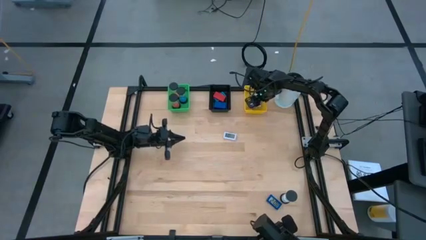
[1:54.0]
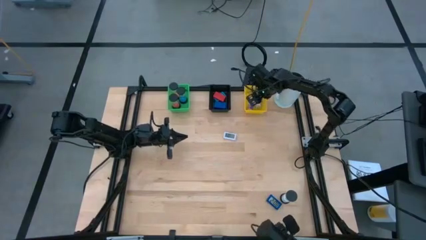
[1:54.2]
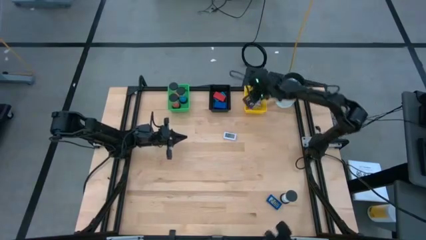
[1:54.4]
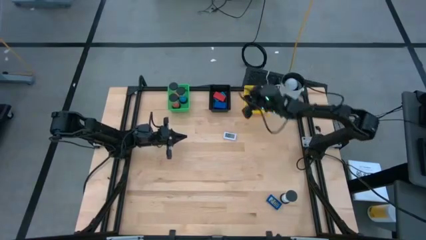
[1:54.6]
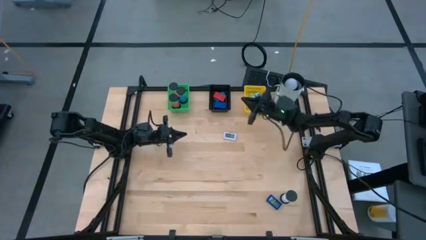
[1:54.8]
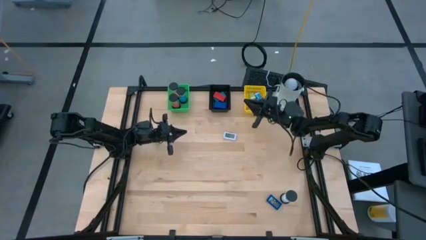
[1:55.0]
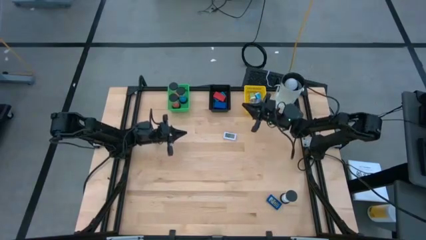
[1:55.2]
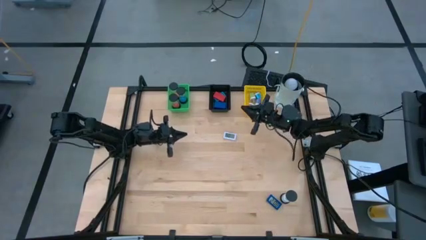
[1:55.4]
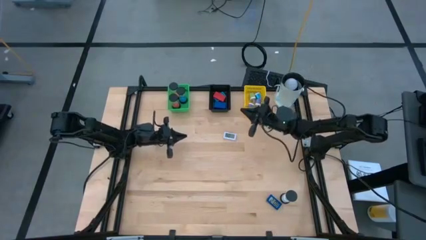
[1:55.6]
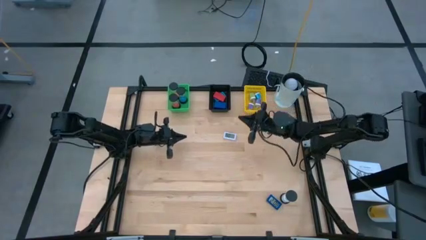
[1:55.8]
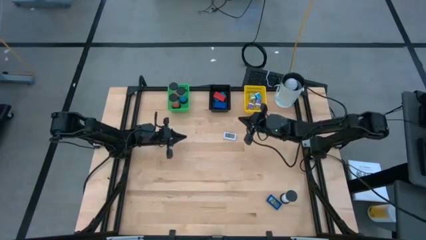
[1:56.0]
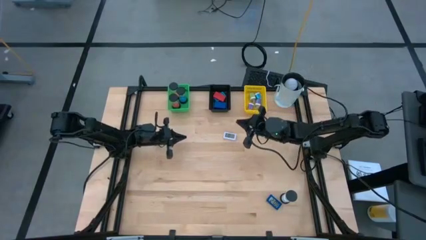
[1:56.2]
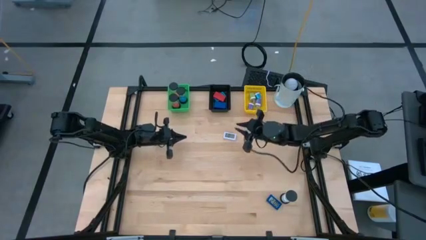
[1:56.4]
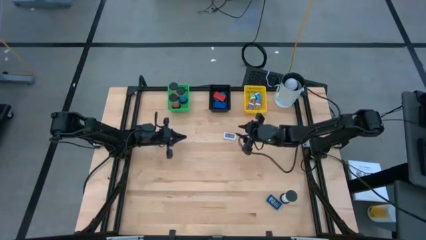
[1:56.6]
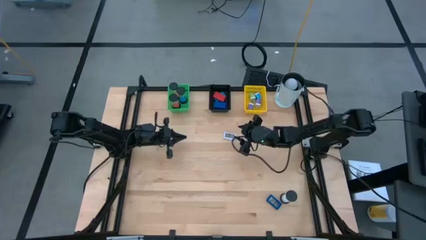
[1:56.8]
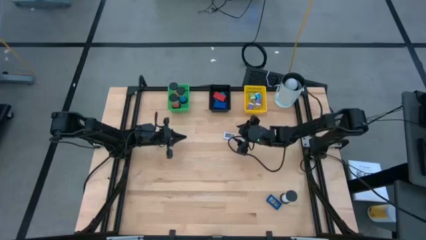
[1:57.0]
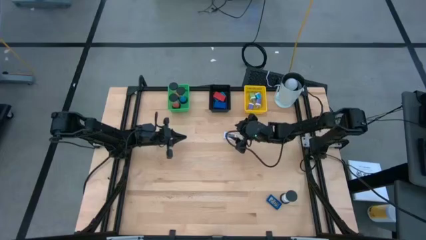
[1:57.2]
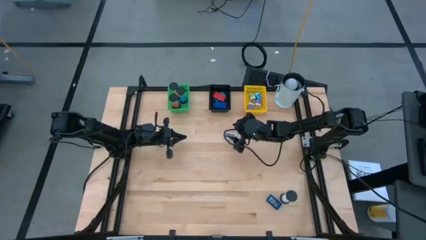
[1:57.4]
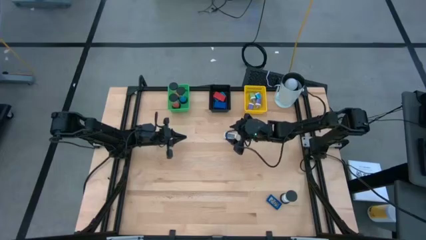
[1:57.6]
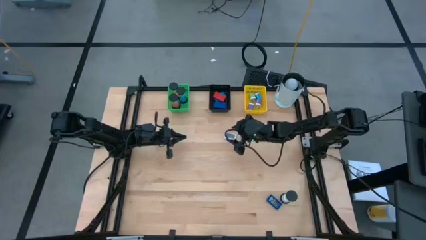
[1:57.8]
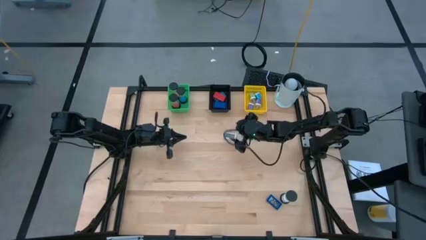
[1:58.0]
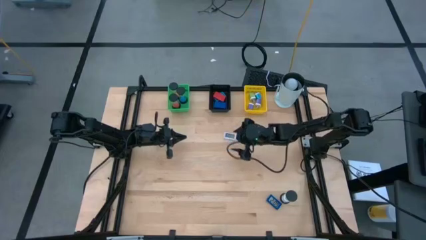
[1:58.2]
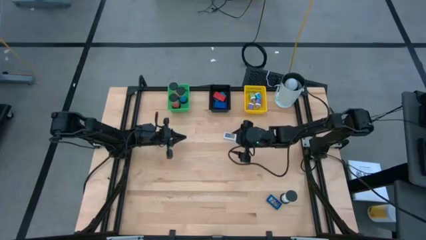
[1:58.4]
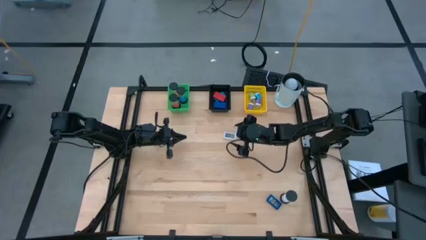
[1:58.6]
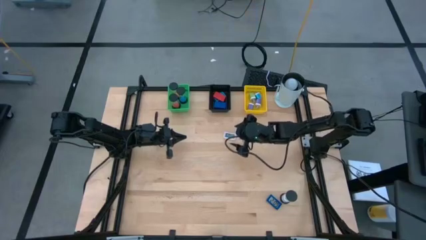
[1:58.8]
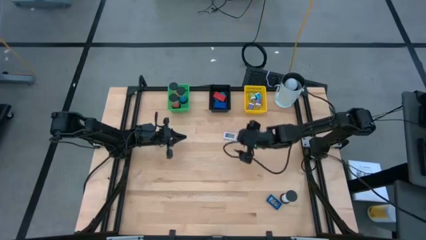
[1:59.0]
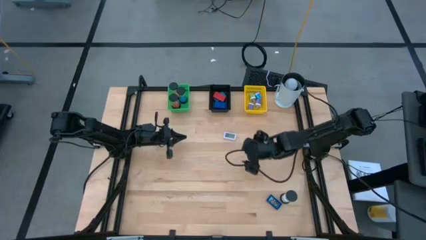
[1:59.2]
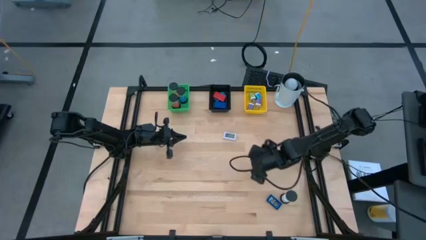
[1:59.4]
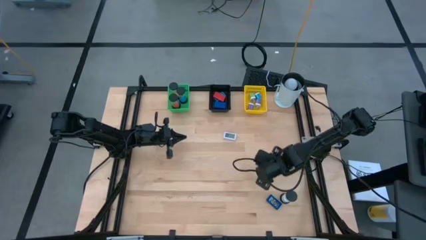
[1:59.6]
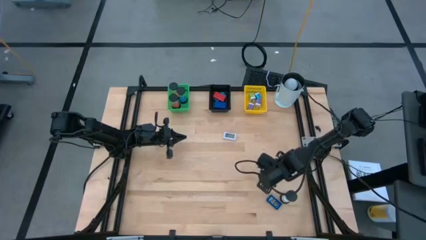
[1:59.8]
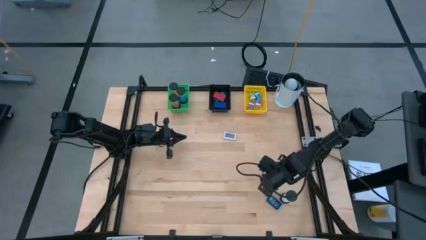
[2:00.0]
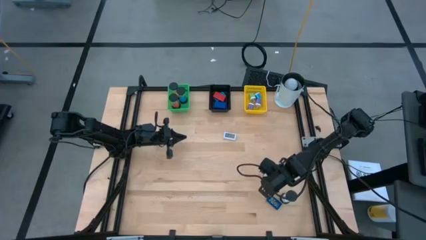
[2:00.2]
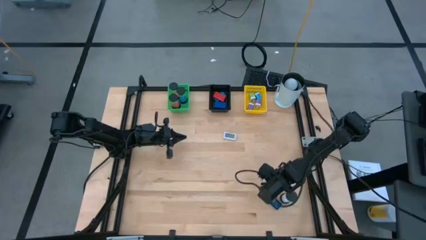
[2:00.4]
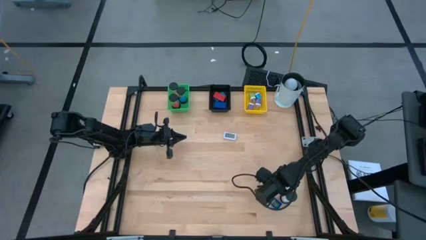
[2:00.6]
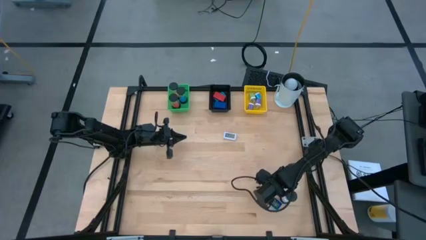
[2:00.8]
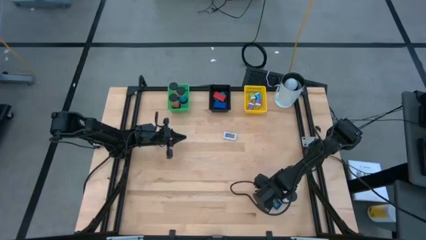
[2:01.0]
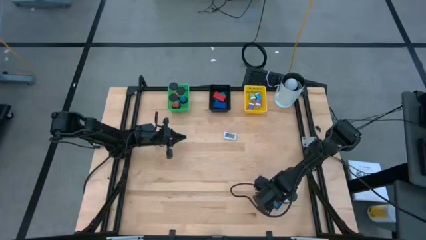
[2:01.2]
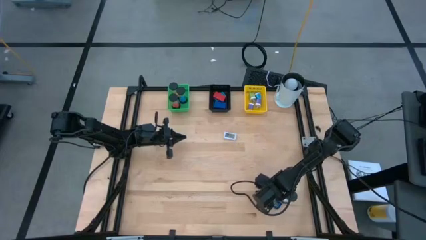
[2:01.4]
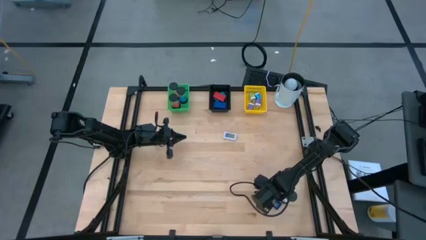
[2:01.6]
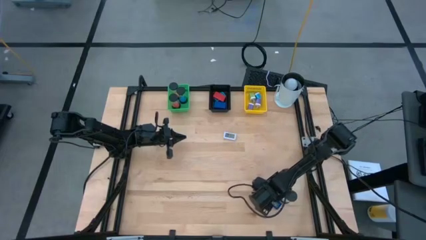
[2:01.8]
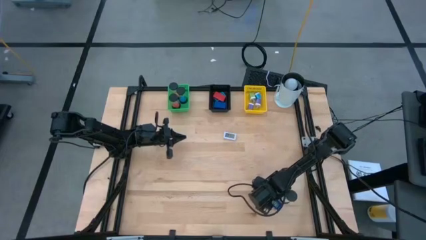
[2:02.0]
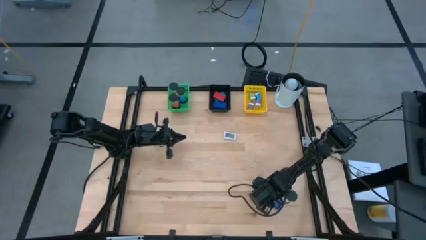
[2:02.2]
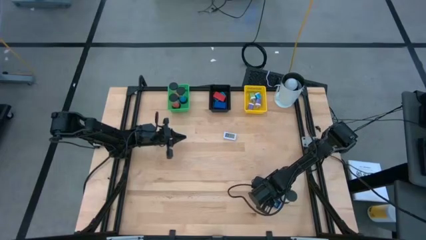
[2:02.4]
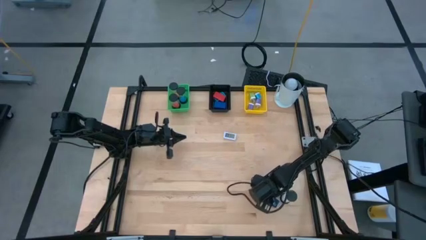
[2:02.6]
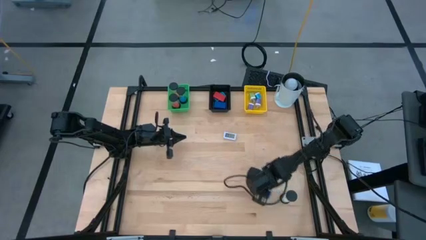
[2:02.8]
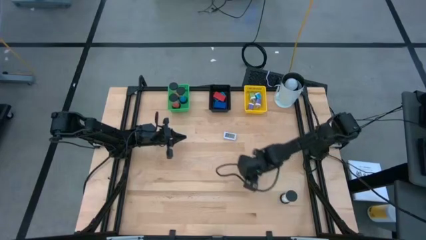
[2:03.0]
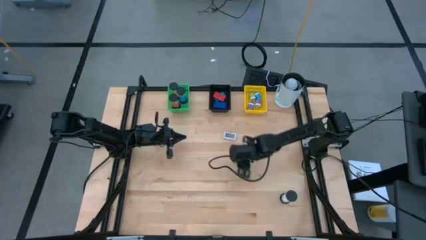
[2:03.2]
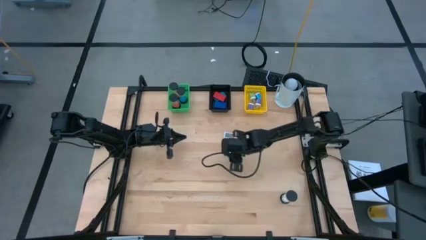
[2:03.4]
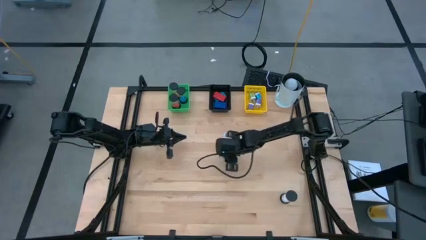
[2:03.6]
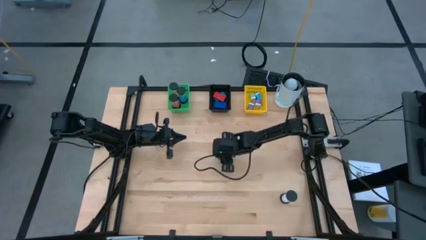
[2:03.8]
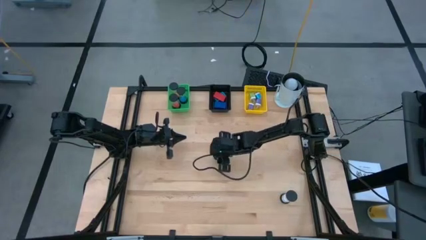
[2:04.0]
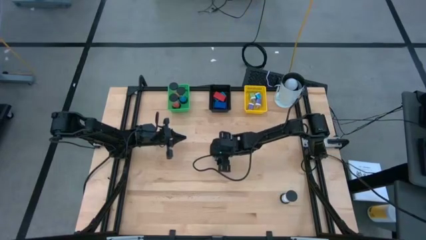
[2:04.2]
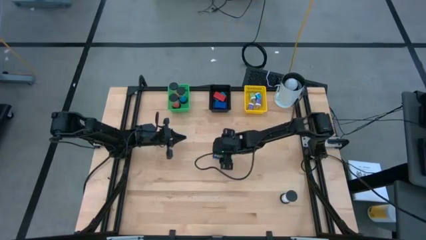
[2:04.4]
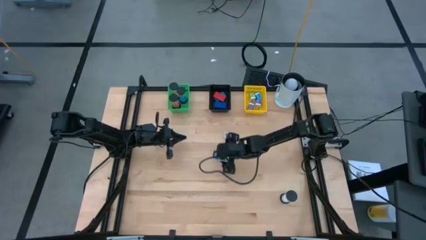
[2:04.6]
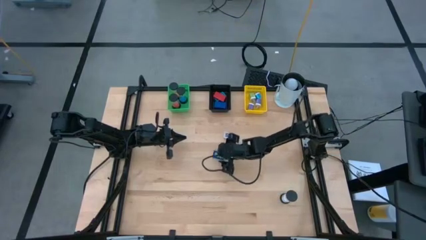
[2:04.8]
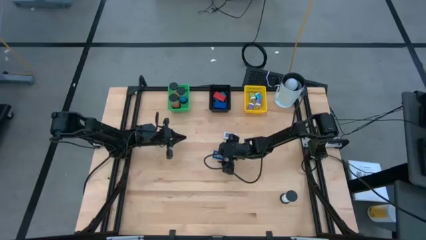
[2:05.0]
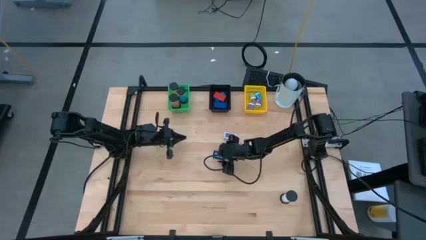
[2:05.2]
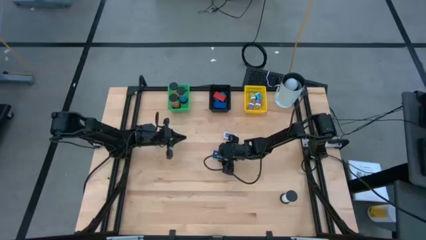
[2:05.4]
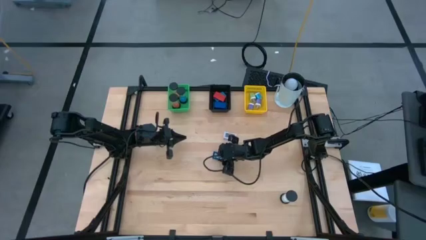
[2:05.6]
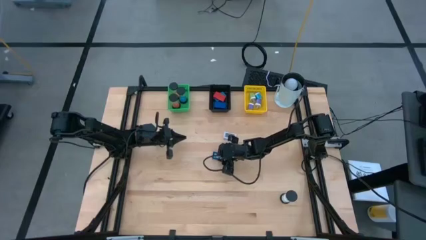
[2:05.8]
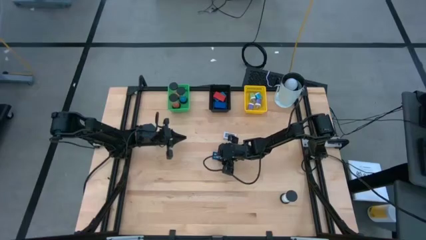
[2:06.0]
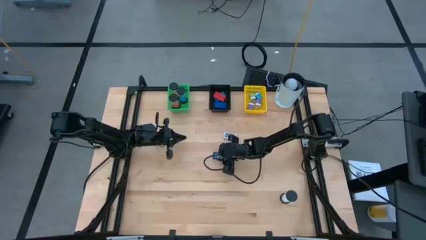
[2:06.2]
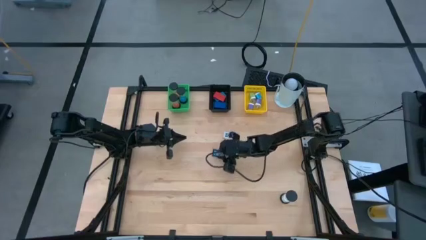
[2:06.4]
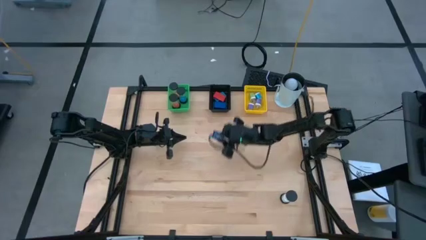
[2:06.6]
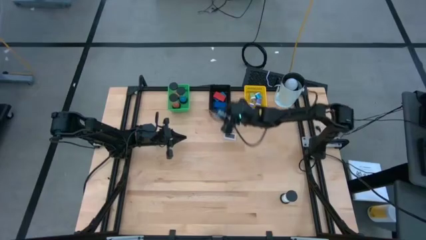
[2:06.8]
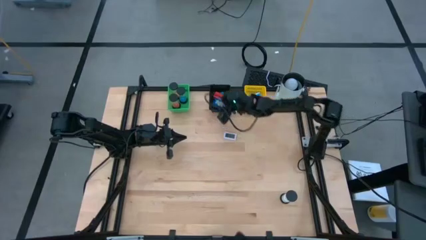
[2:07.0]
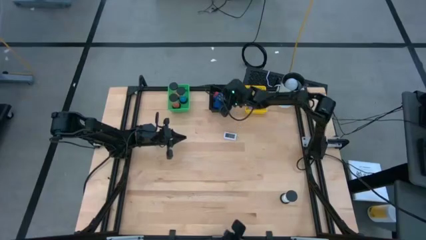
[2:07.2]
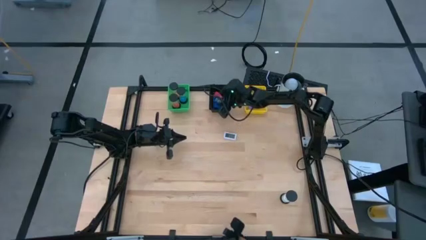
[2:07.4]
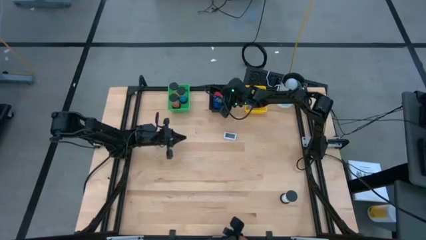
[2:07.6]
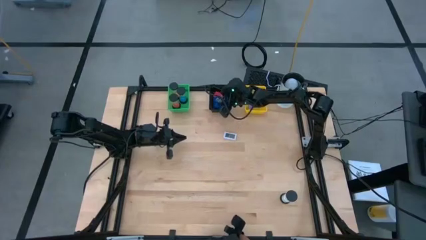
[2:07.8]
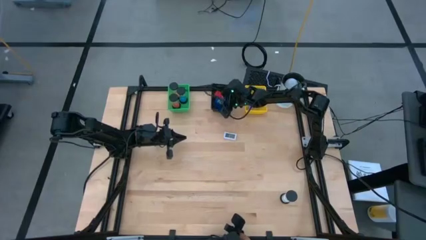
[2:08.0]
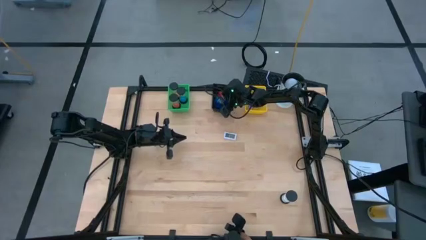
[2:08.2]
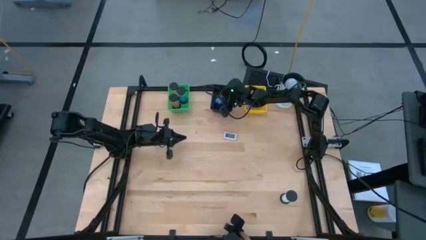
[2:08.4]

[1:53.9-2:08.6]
Task: Pick & Place Office items
Put the blue digital timer into the black bin

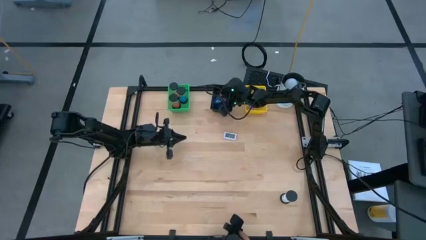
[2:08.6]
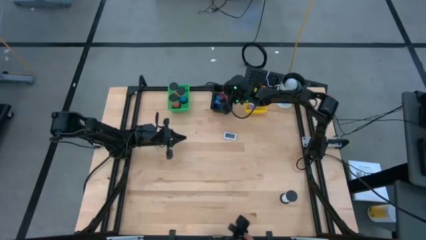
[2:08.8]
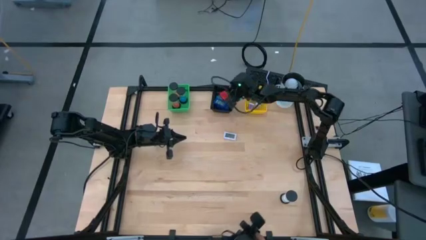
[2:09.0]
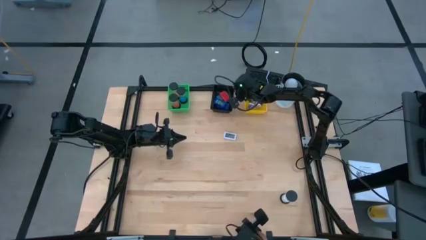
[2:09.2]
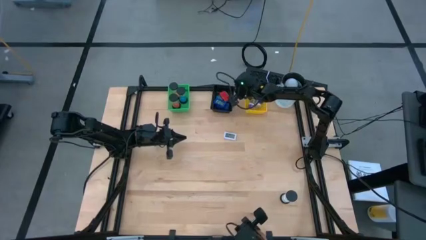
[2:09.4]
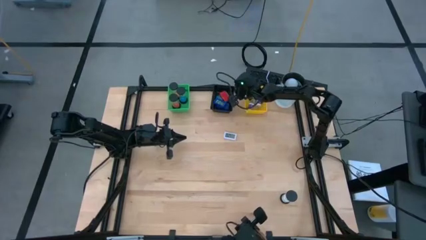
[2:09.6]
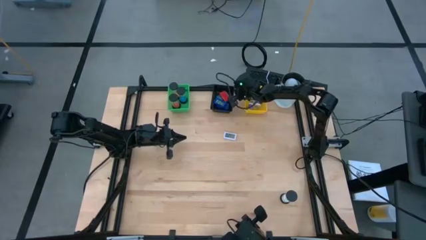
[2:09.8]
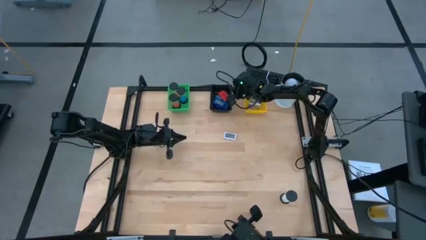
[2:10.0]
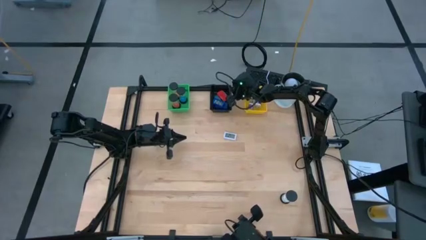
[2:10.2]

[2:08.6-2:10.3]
Adjust the black bin

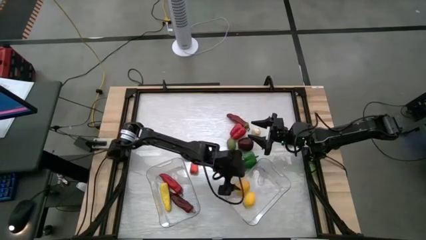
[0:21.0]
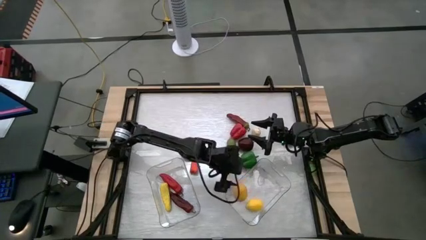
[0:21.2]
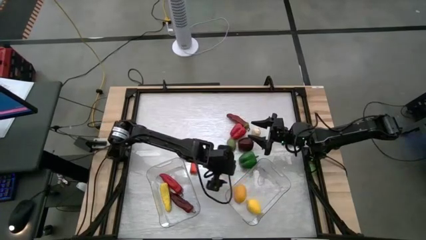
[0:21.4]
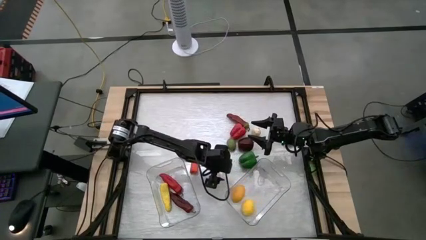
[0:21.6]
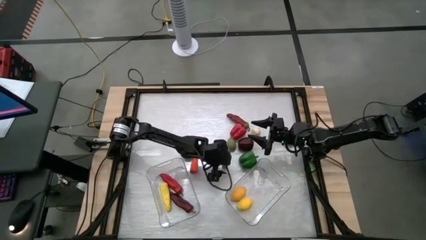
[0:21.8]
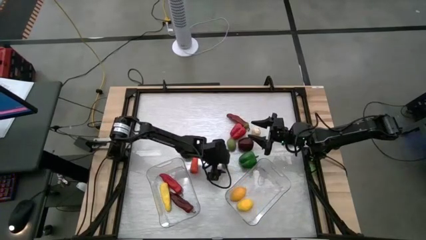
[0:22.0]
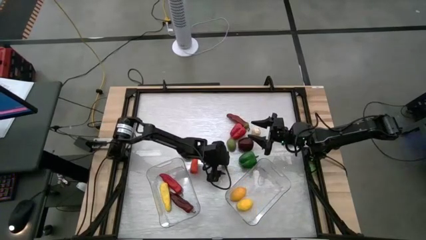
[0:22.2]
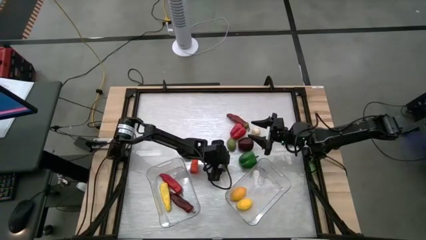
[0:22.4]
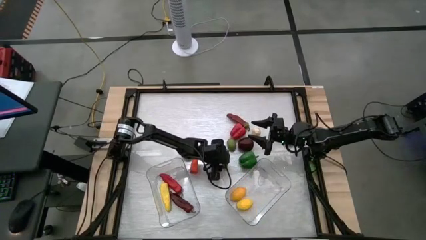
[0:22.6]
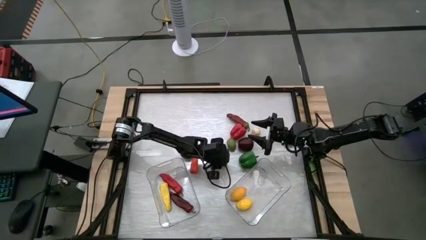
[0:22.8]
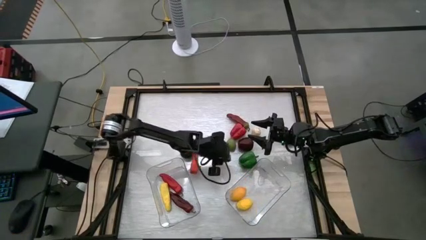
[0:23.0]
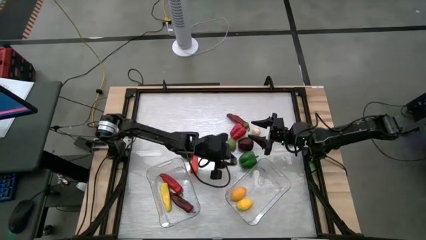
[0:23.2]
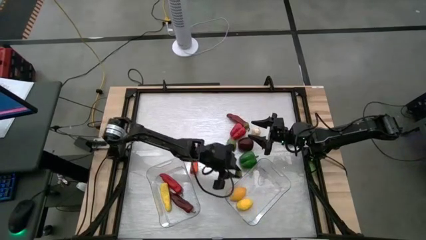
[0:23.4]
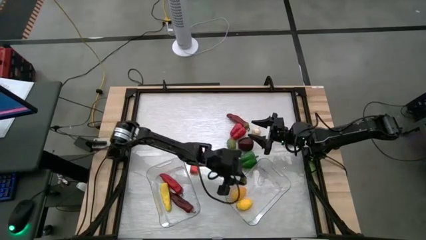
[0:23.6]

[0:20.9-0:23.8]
Task: Sort produce into baskets
Put the small tomato into the right transparent bin
